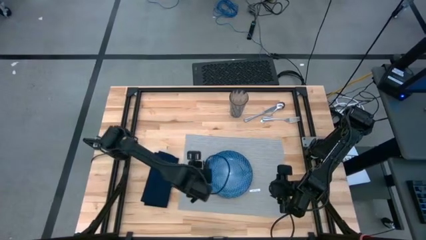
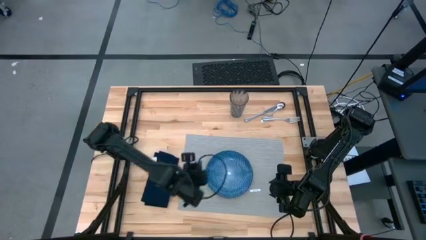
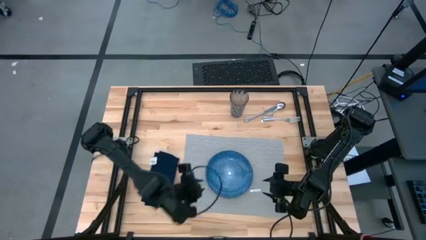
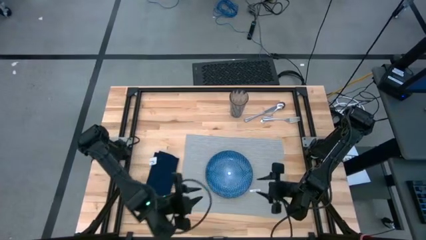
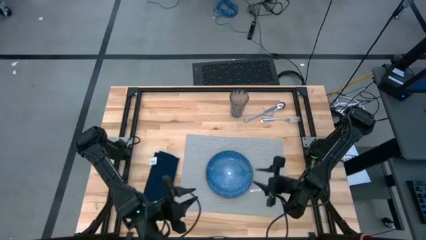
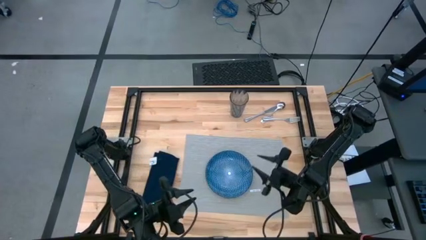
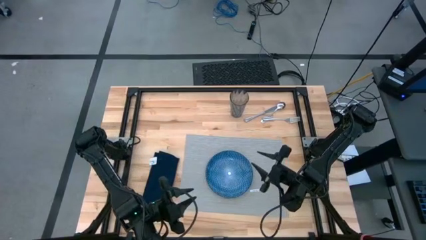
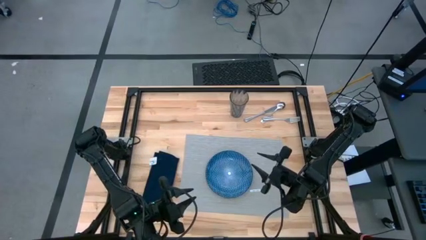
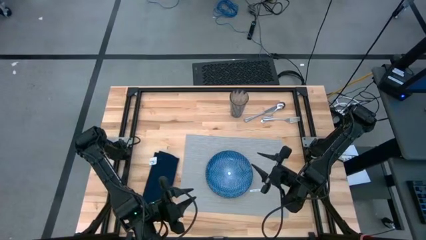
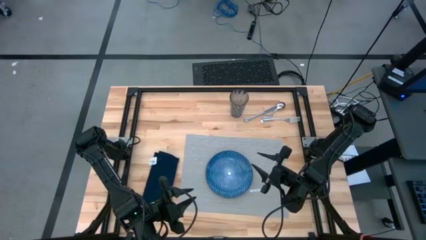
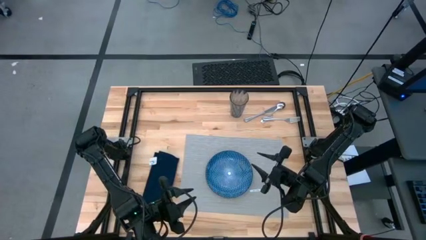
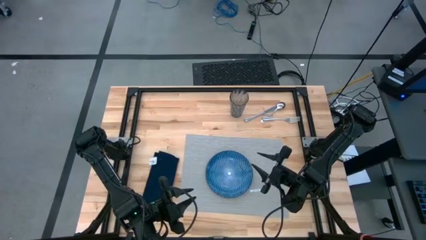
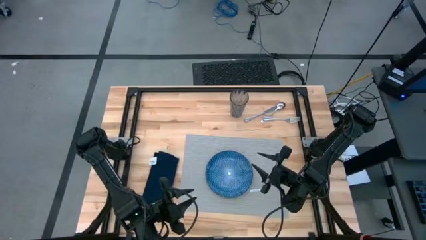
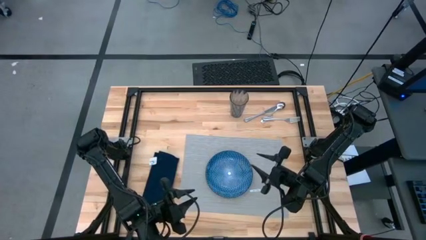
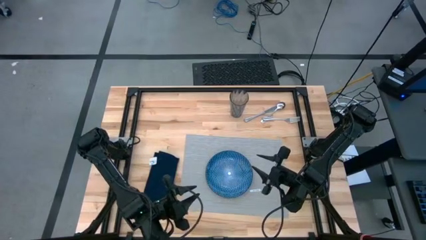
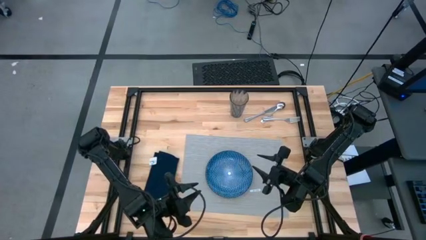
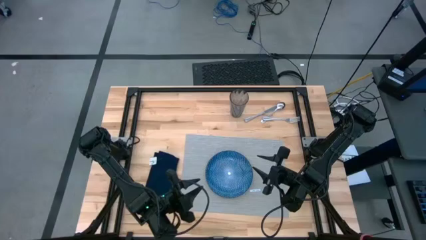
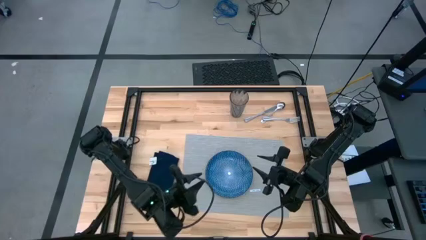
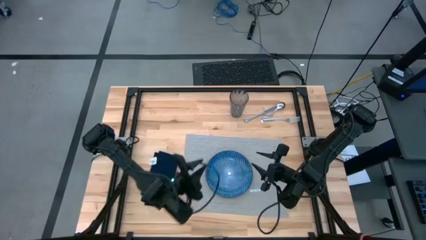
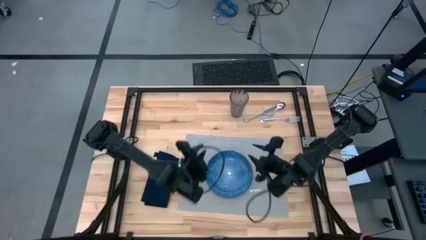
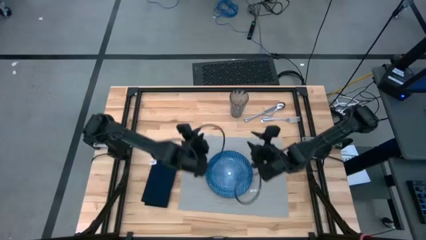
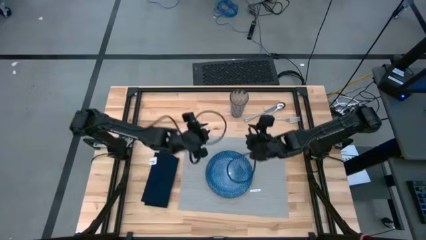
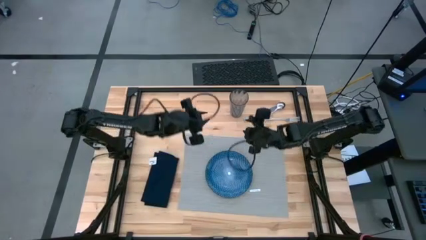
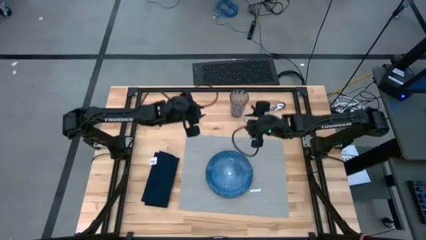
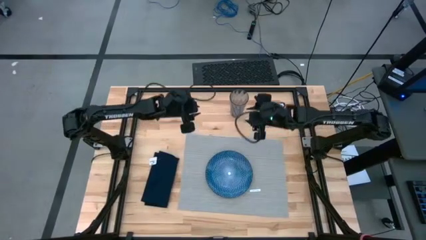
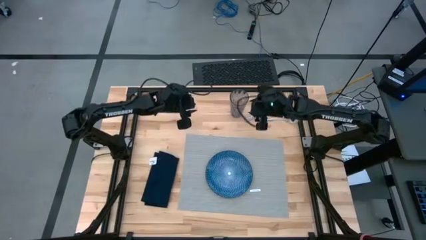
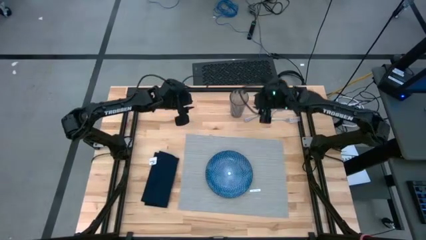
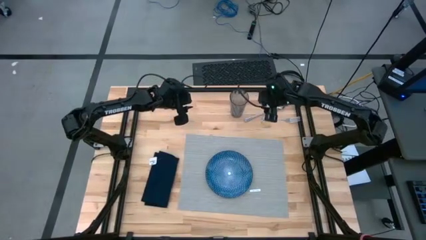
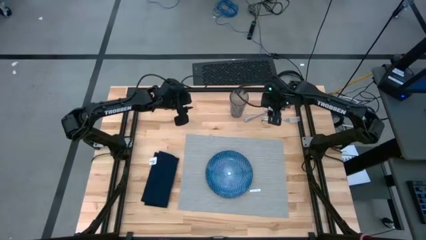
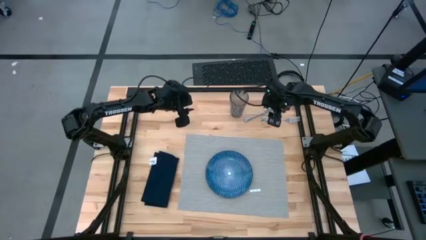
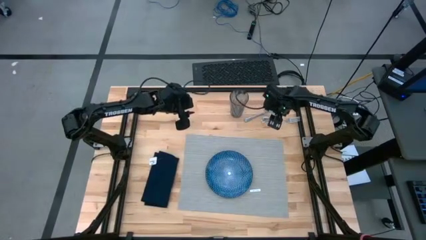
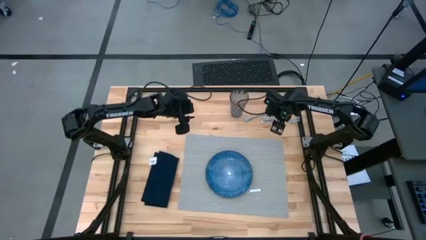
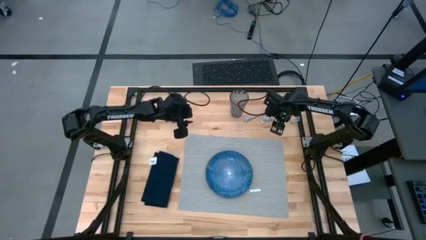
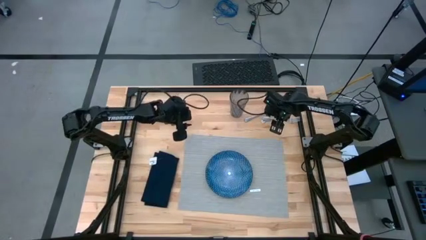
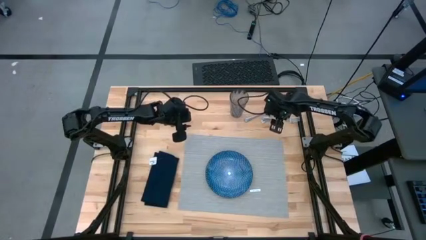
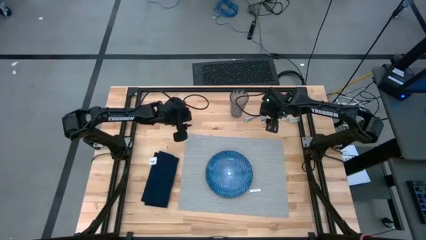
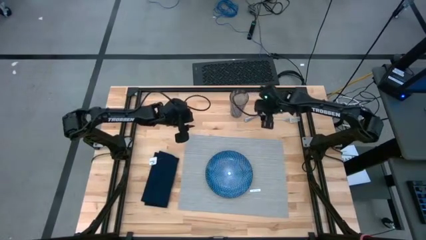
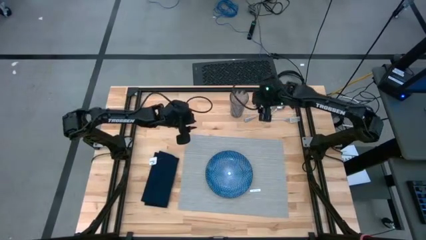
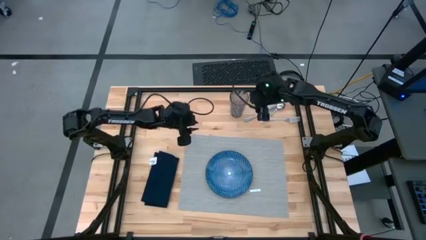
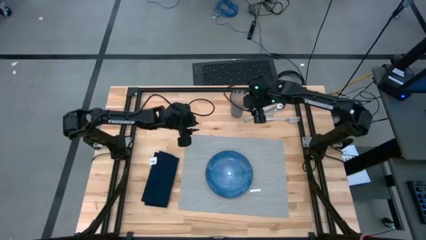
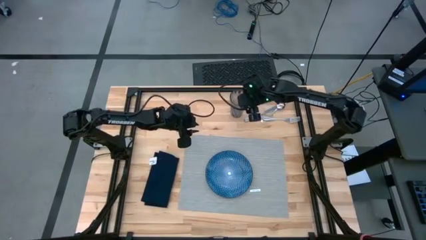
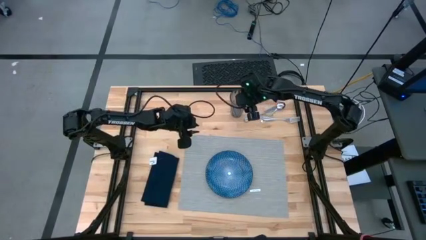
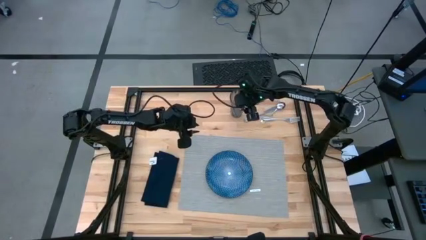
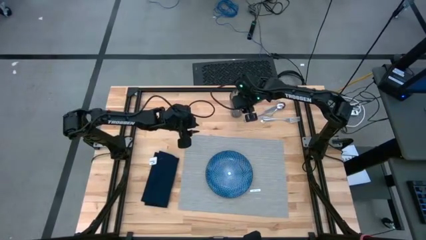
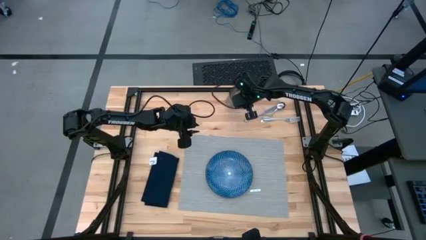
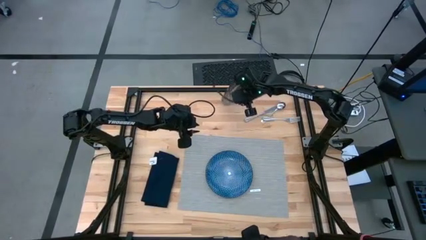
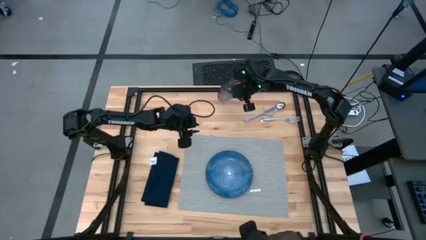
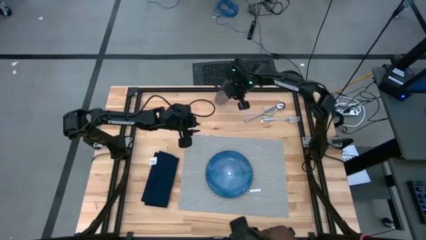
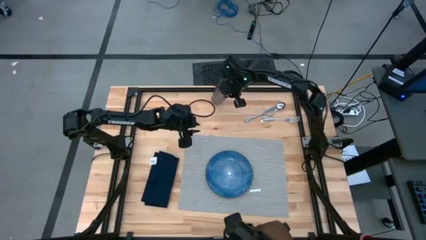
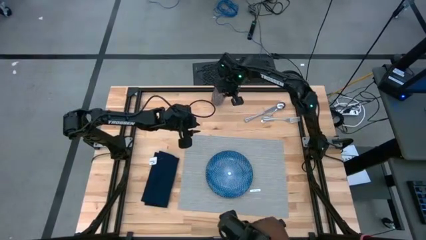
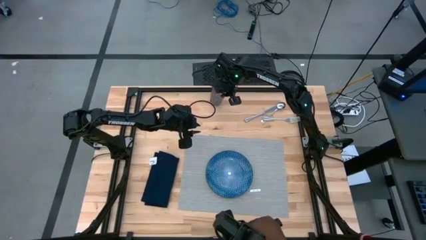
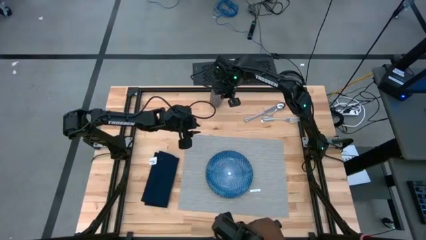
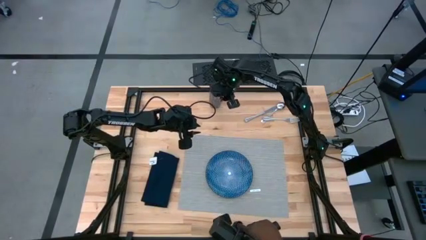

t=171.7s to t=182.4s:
Task: Set table place
Adjust the blue cup

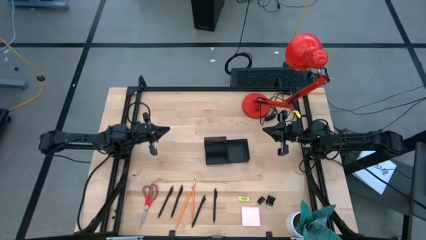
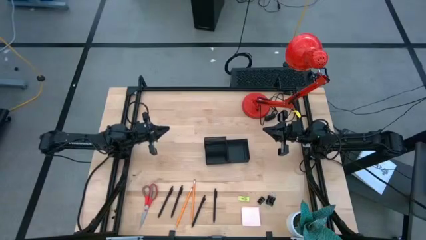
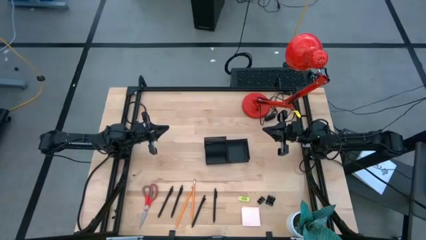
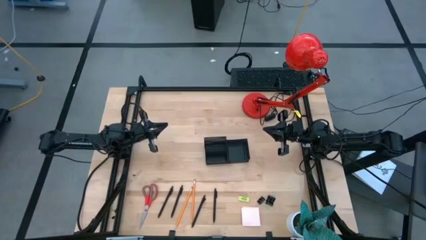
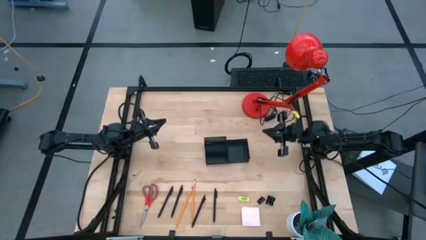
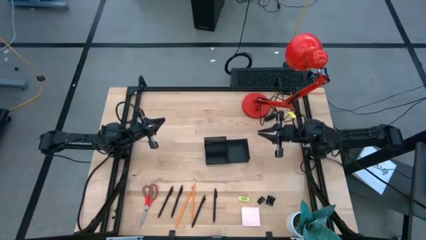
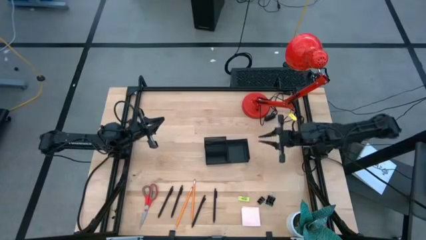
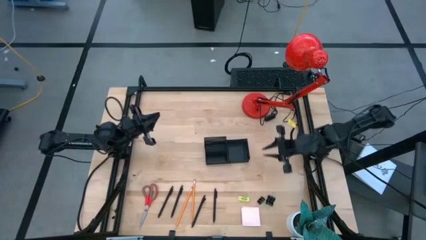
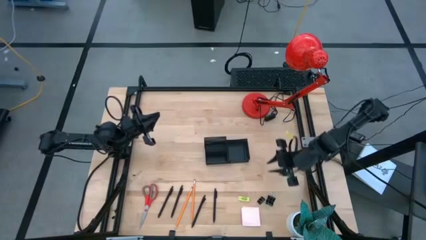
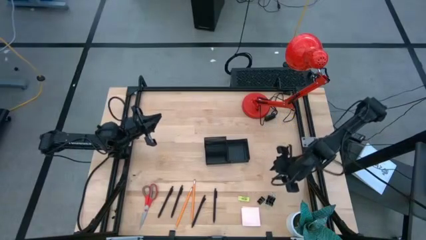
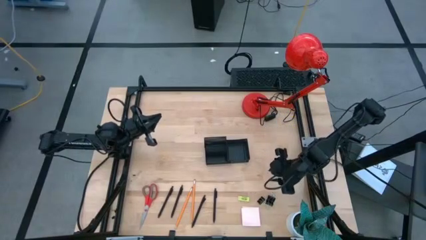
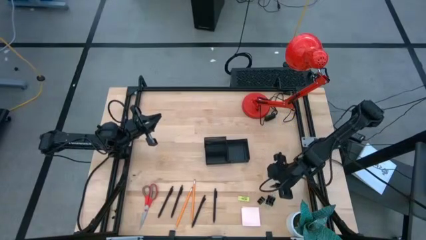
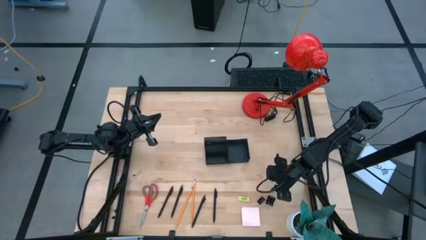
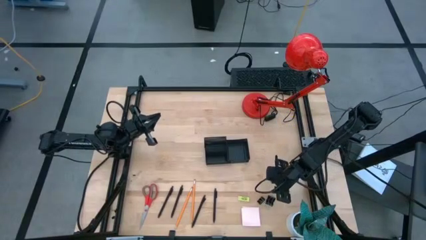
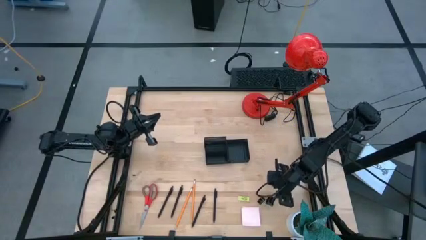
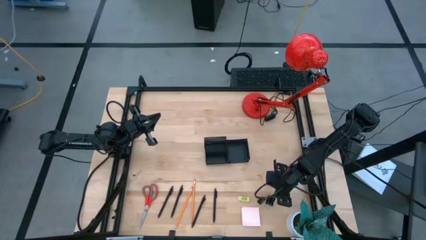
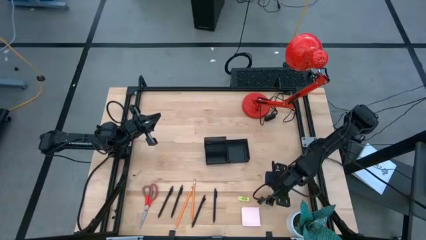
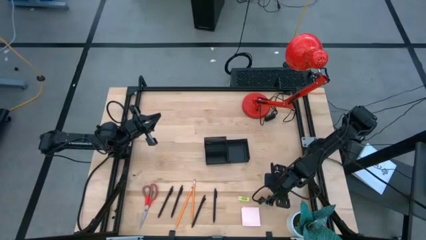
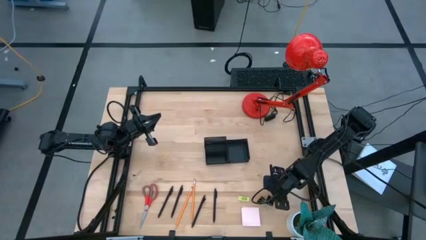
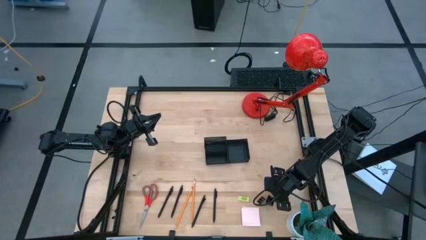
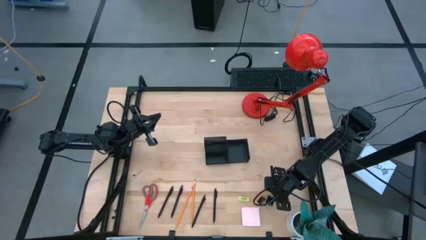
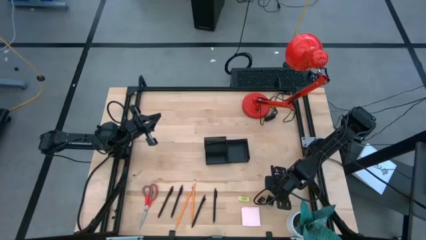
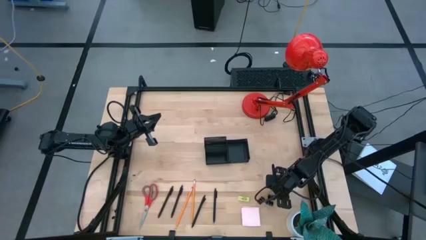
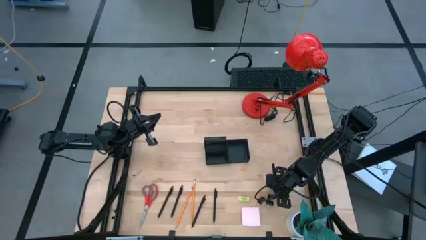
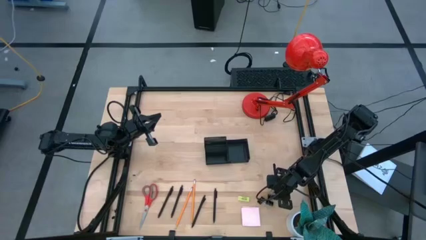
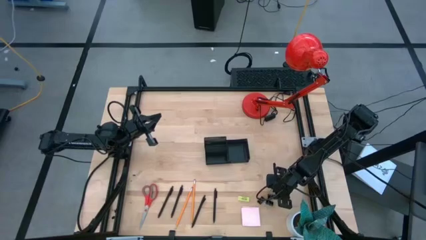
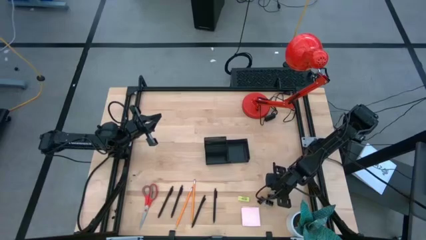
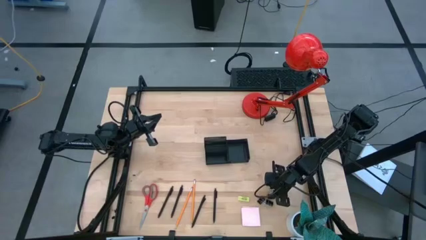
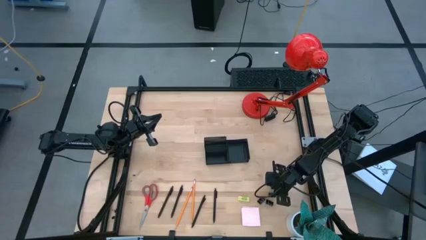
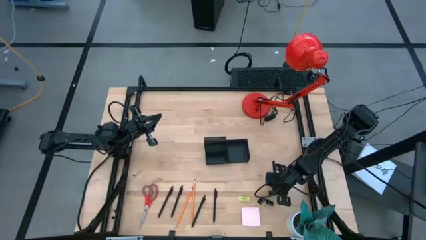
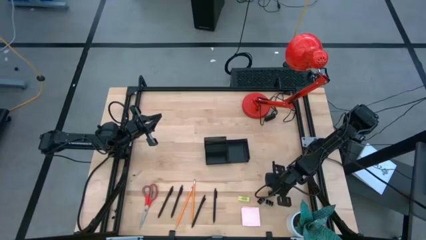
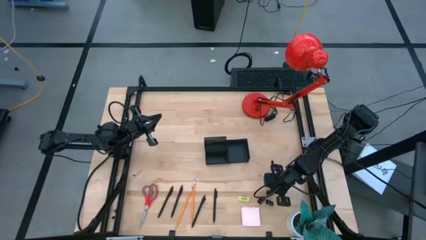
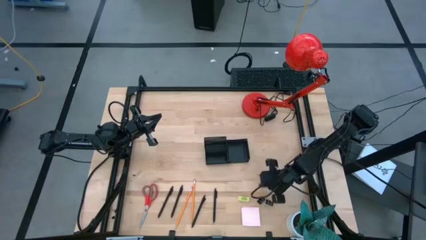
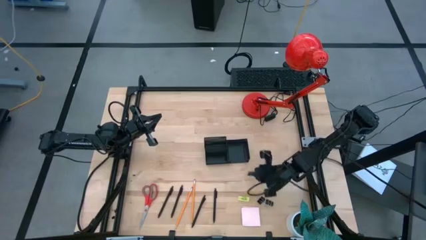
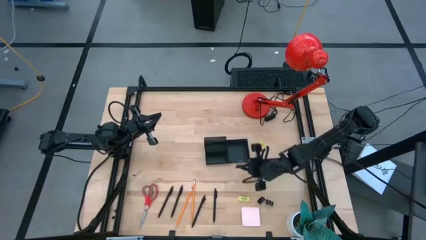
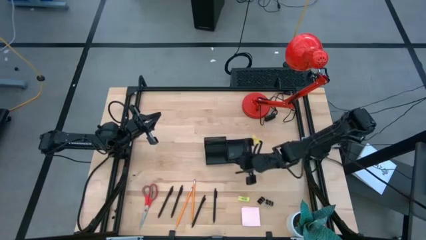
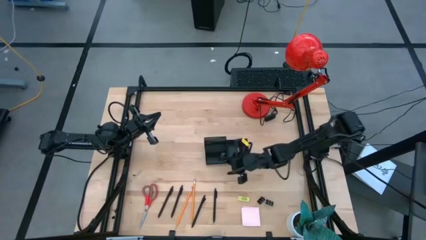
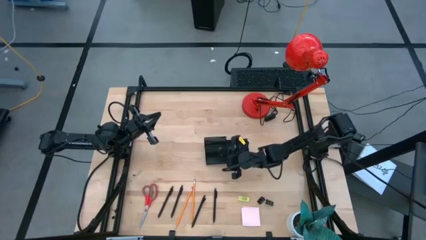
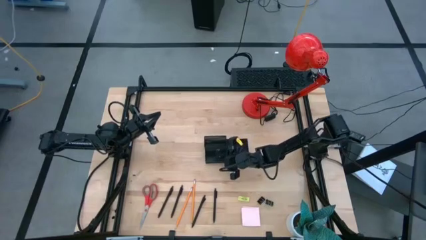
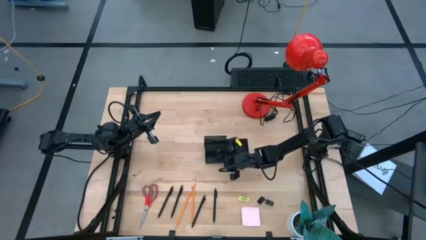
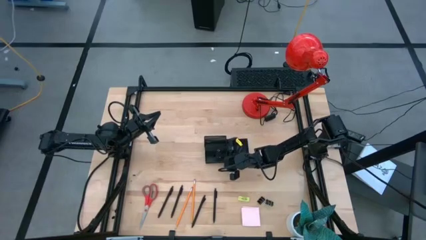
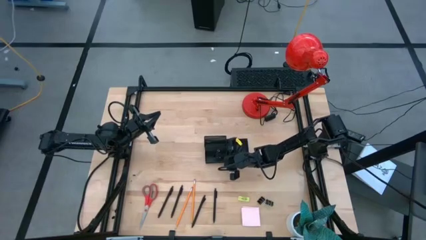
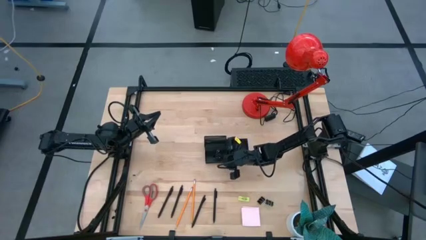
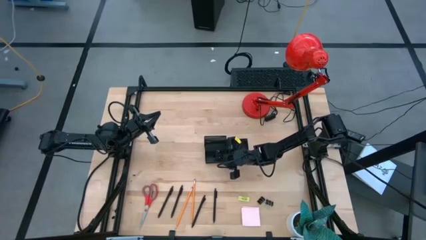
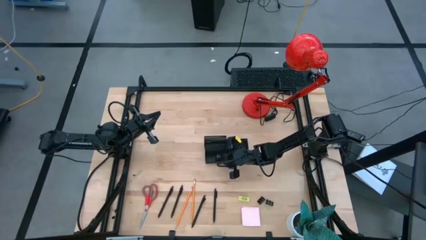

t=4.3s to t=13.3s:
Task: Pick and place office supplies into organizer
Put the right black binder clip into the black desk organizer
